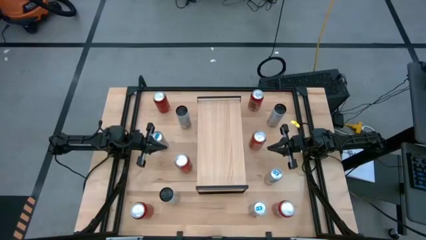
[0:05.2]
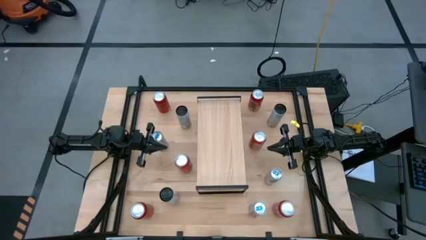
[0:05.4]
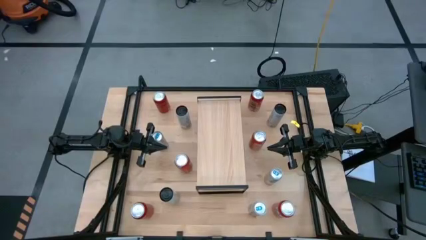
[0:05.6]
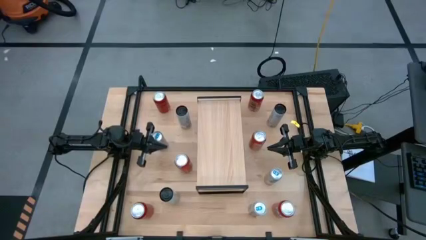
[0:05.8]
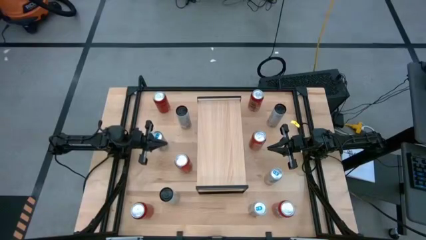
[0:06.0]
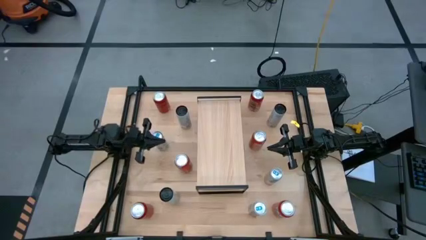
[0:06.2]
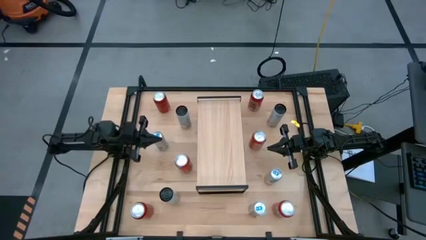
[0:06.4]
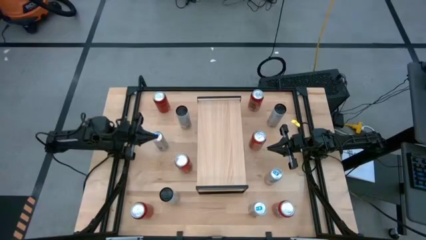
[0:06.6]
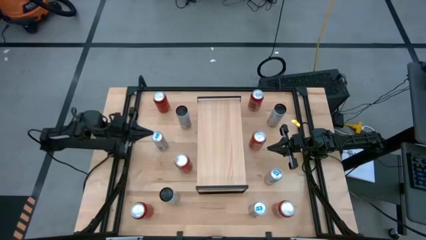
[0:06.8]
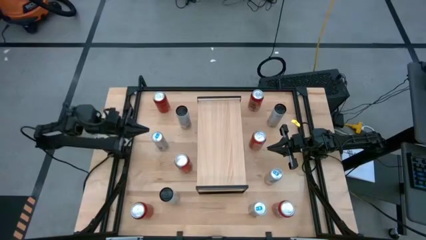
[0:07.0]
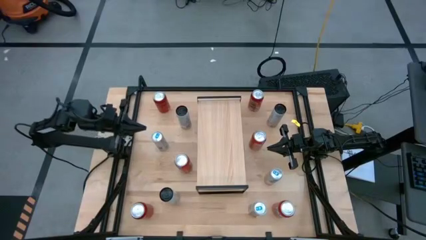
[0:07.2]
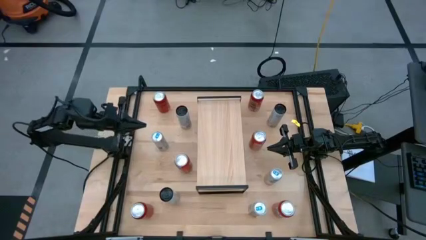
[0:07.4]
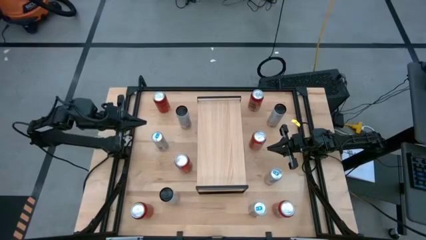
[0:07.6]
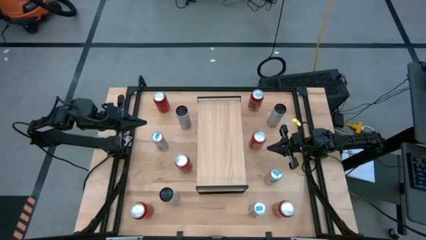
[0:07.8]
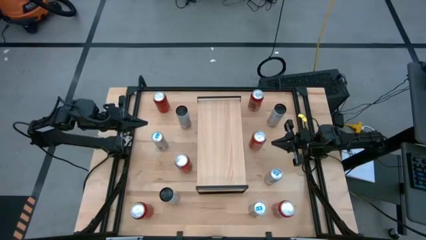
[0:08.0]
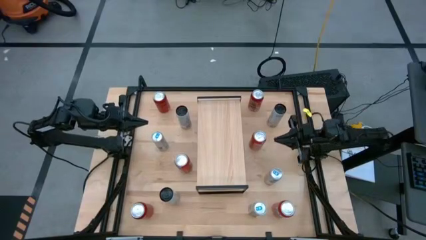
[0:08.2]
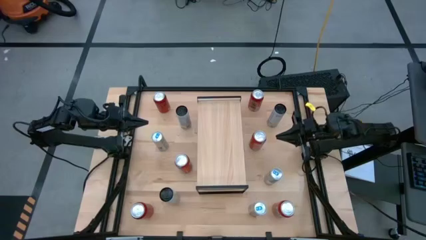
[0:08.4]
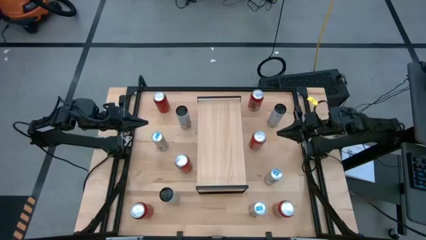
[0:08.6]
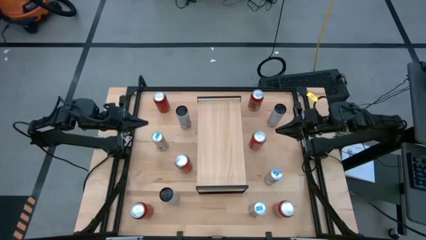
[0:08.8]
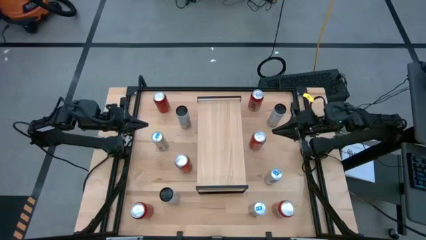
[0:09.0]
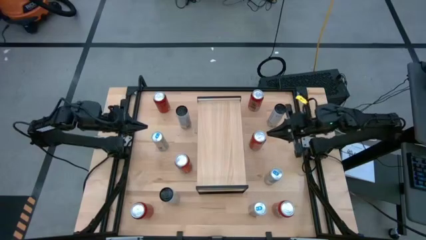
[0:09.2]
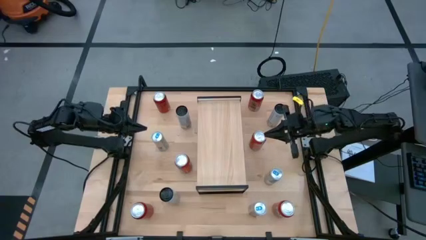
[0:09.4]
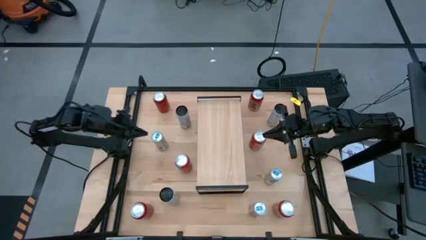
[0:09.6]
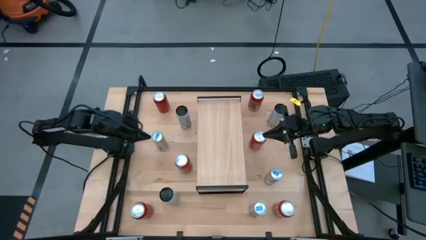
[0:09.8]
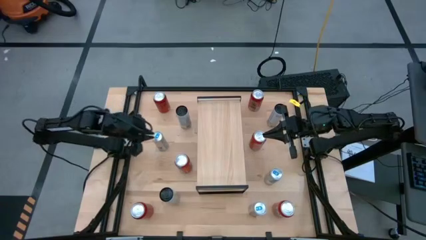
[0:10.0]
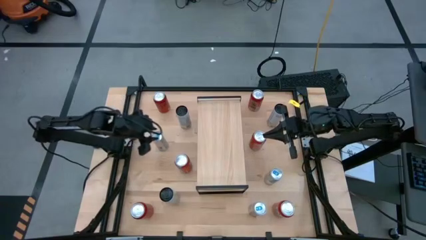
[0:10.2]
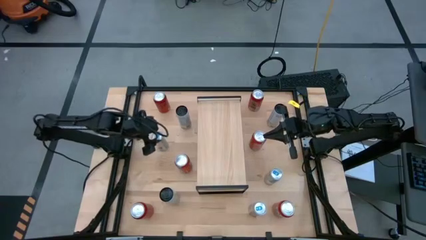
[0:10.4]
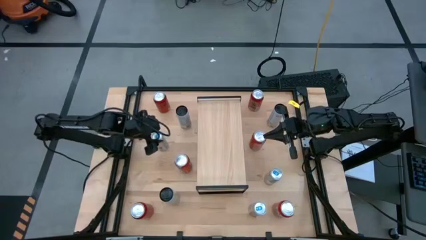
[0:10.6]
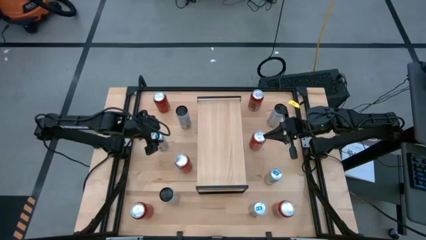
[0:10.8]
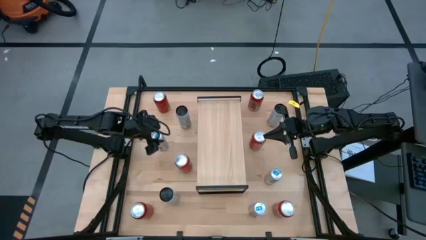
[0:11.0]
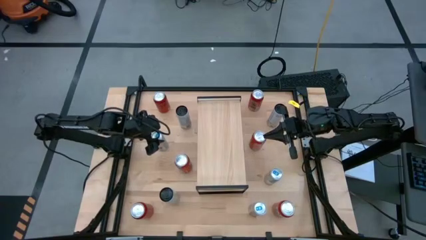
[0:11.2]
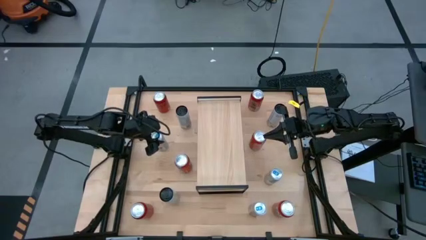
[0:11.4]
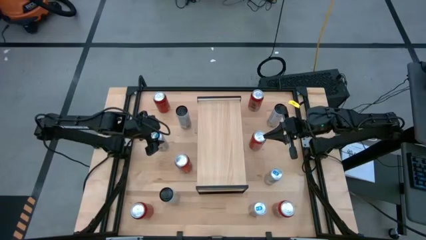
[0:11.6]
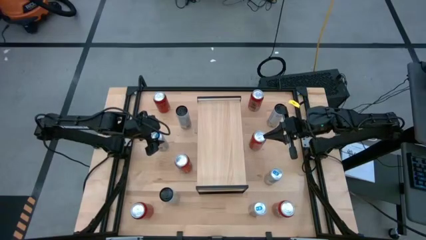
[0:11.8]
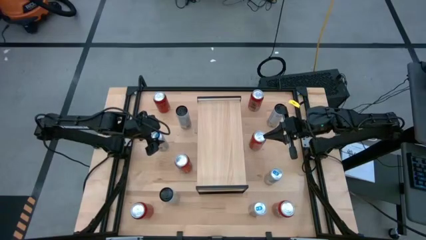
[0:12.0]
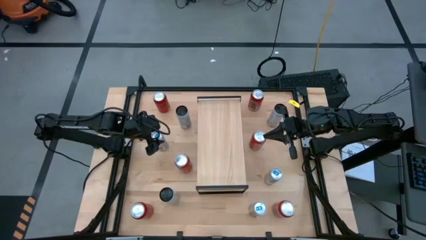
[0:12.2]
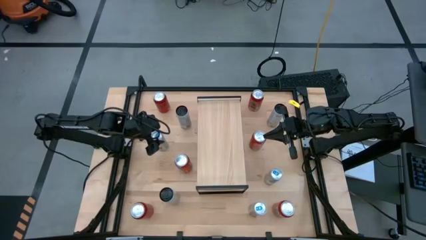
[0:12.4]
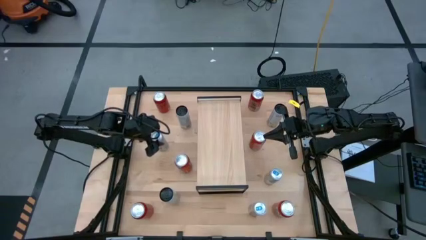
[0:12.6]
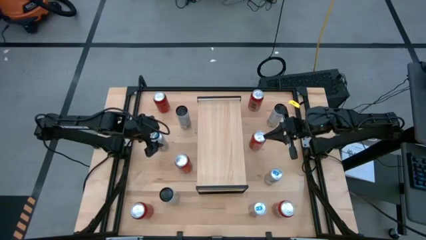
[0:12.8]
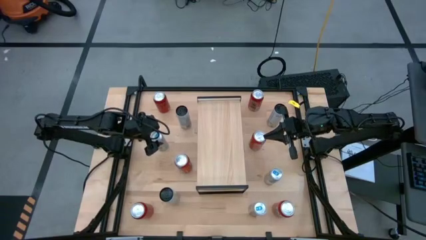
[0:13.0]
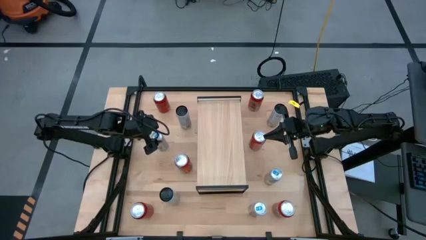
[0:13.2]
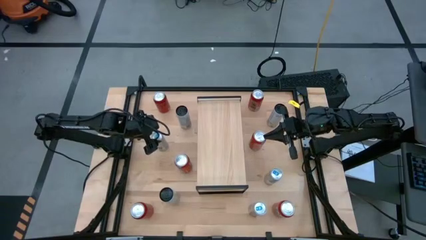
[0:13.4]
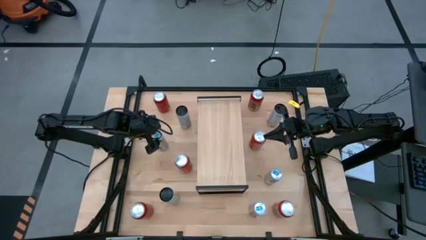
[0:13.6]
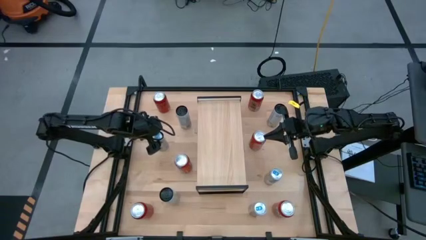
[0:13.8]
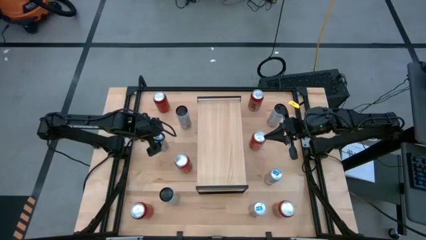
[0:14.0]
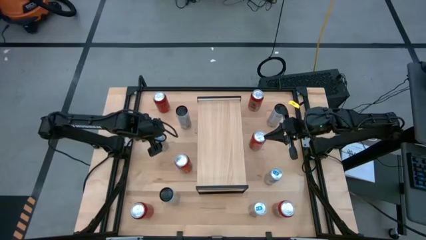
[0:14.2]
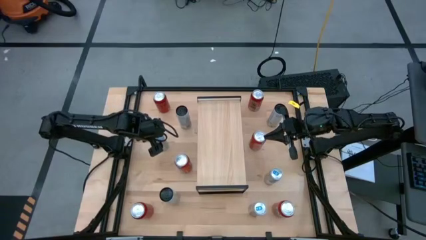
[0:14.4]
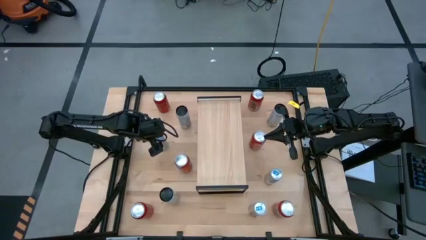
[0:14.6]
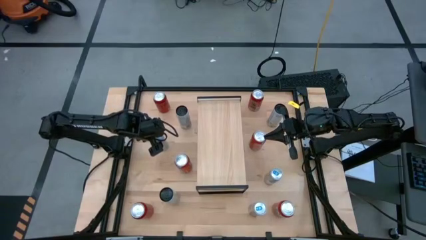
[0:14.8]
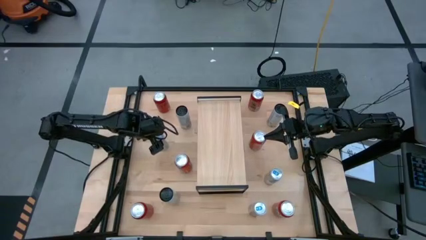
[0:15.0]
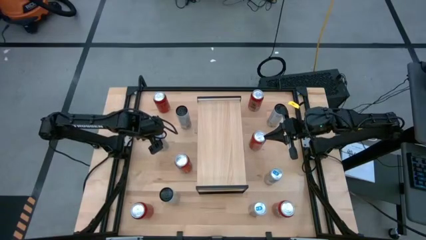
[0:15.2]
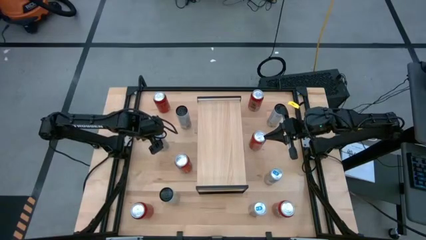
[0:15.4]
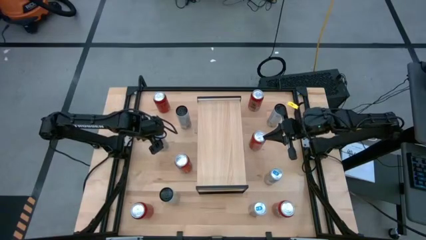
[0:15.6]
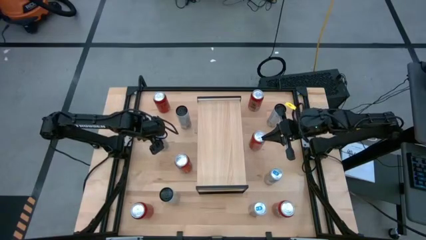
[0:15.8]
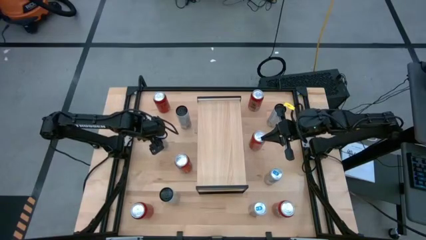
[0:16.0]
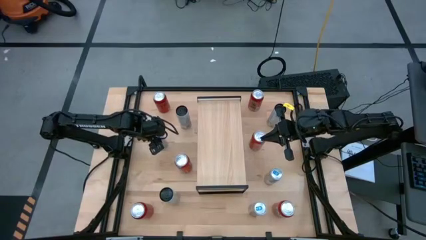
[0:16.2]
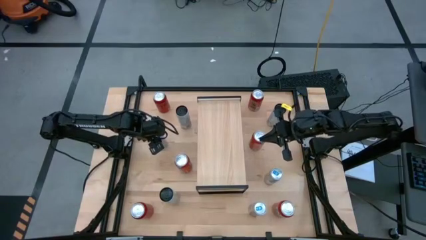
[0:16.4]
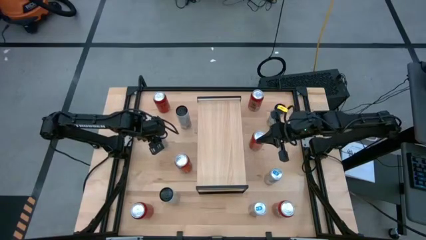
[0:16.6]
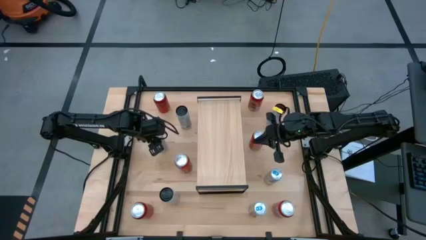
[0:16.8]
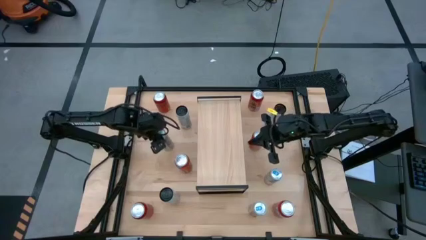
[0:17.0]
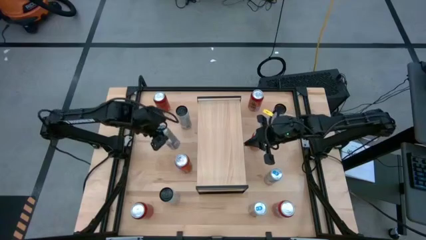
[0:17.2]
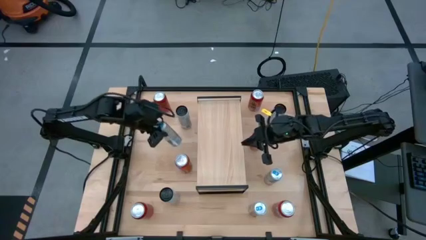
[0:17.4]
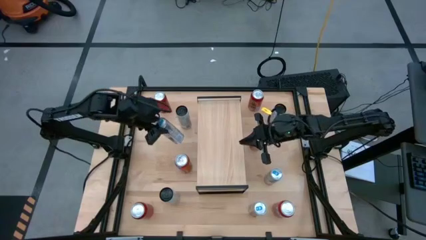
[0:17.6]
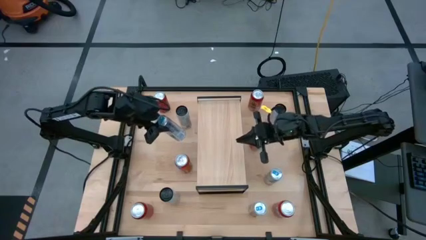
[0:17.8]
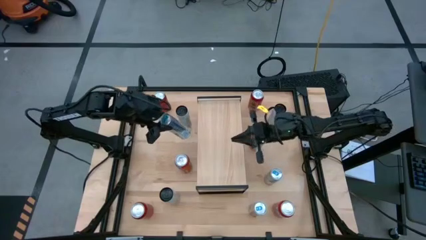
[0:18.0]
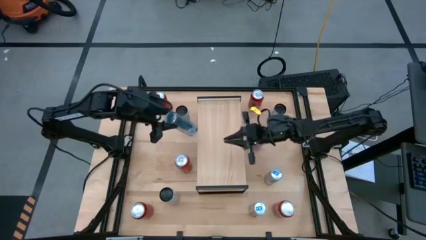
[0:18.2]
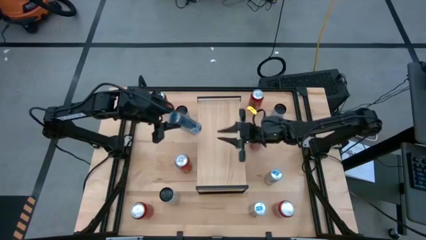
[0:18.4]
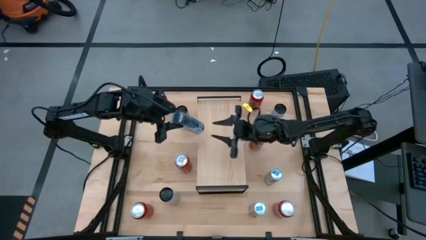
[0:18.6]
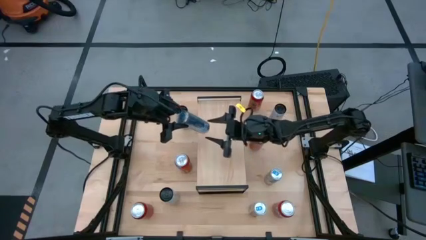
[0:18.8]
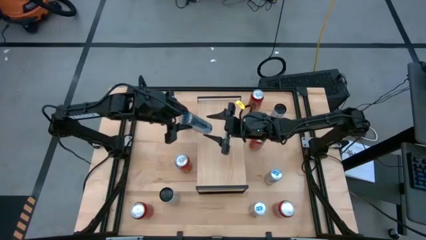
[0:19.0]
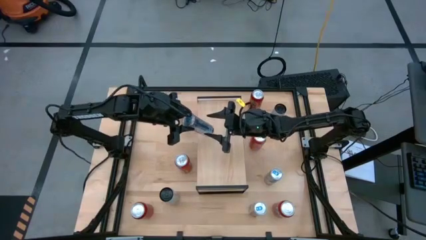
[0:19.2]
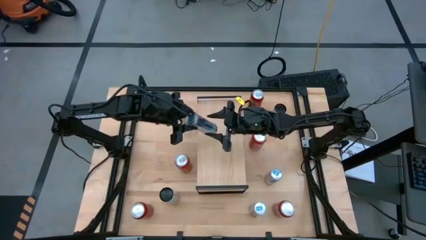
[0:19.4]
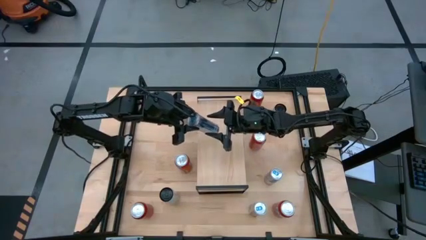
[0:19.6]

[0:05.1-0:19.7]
Task: Place canned beverage on shelf
Put the top left blue soda can on the shelf
